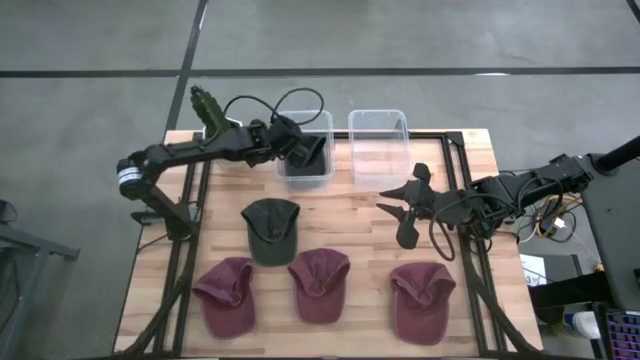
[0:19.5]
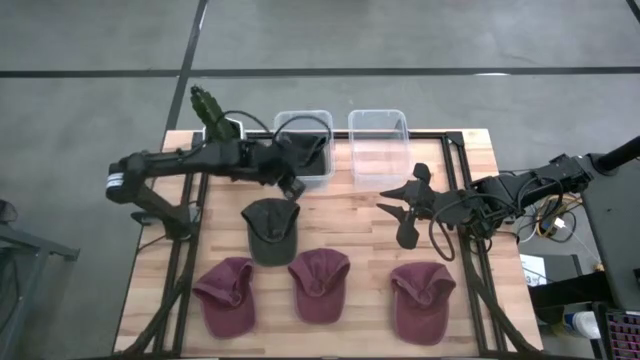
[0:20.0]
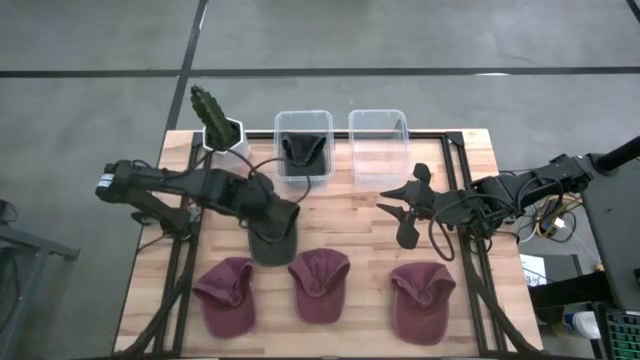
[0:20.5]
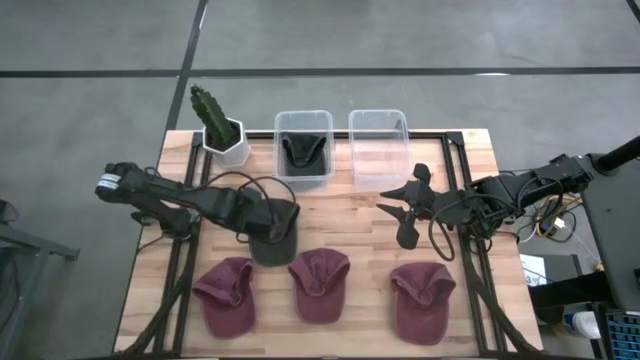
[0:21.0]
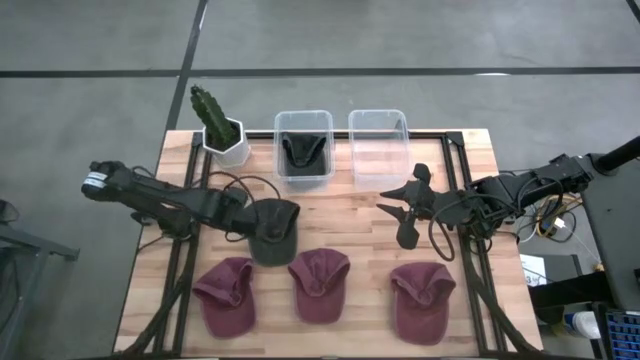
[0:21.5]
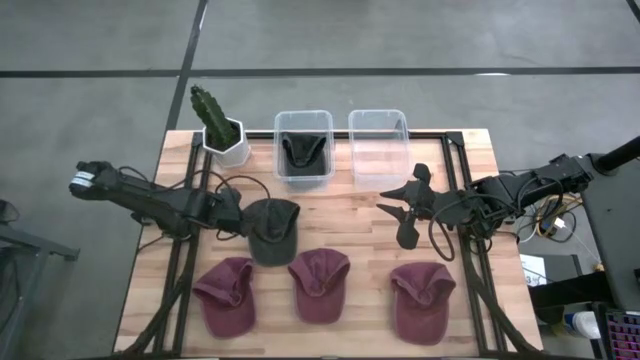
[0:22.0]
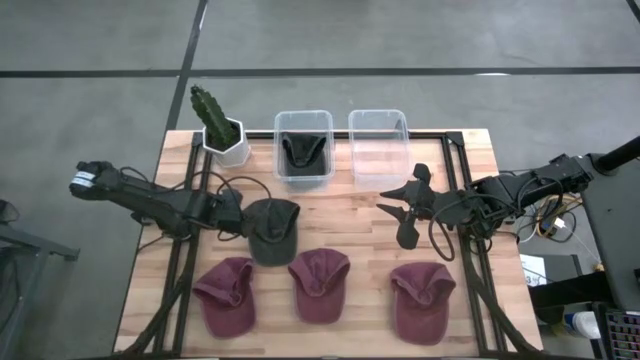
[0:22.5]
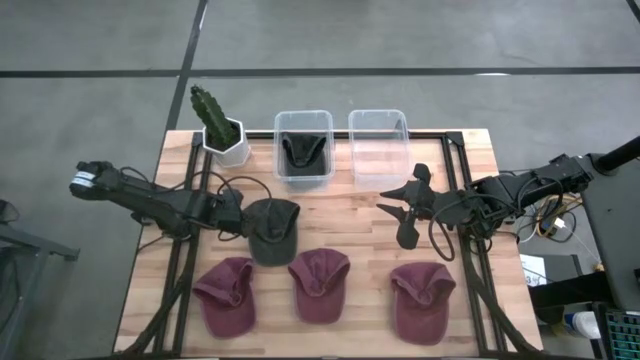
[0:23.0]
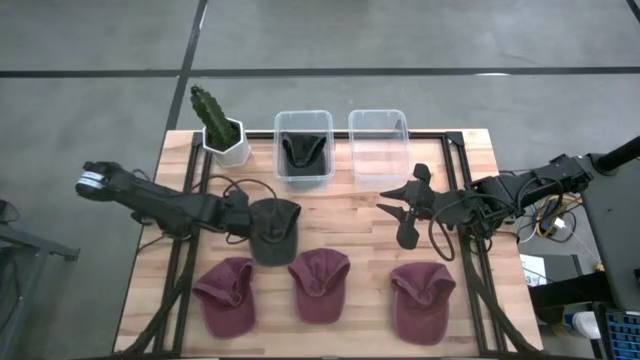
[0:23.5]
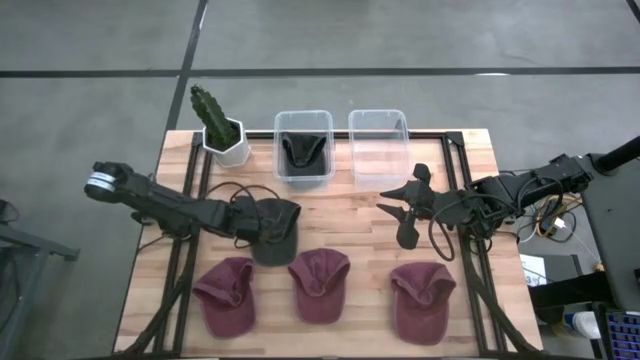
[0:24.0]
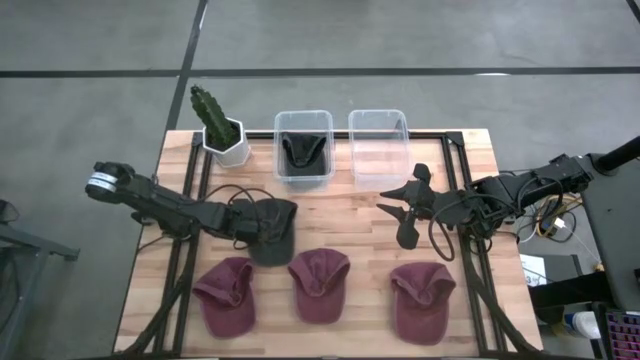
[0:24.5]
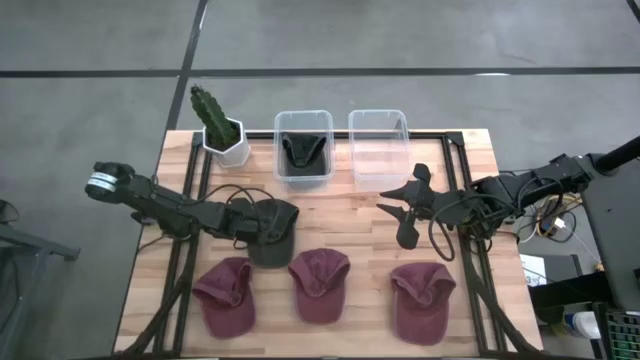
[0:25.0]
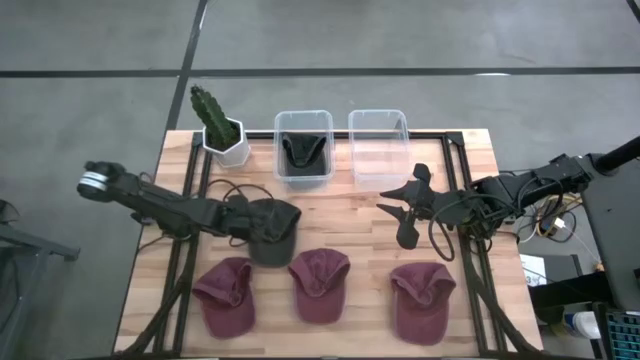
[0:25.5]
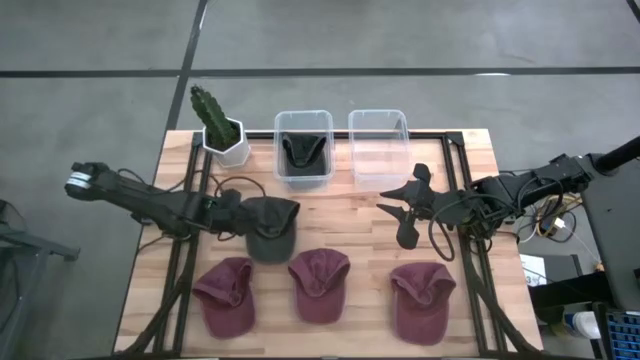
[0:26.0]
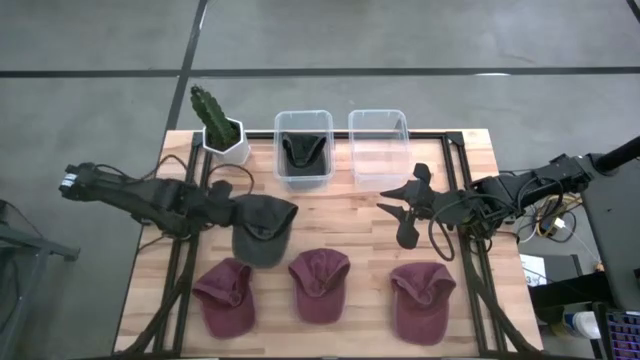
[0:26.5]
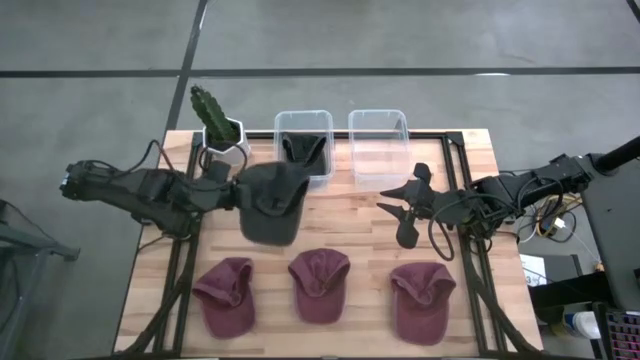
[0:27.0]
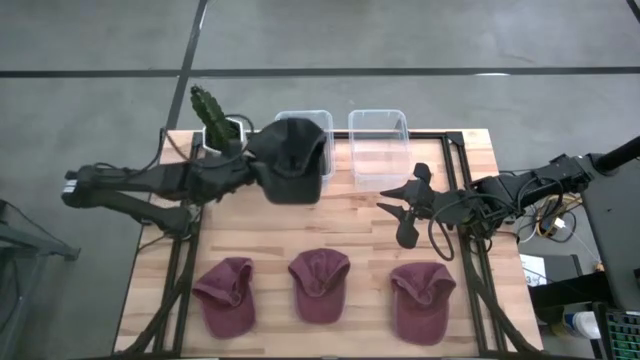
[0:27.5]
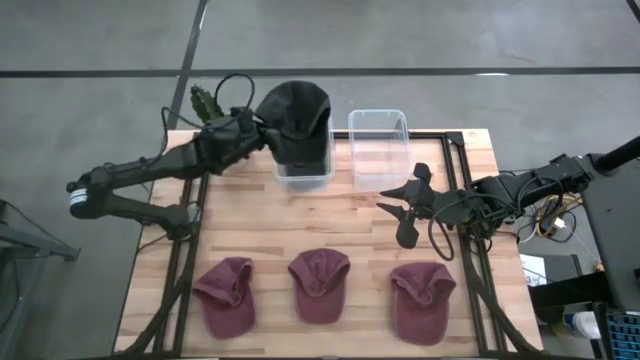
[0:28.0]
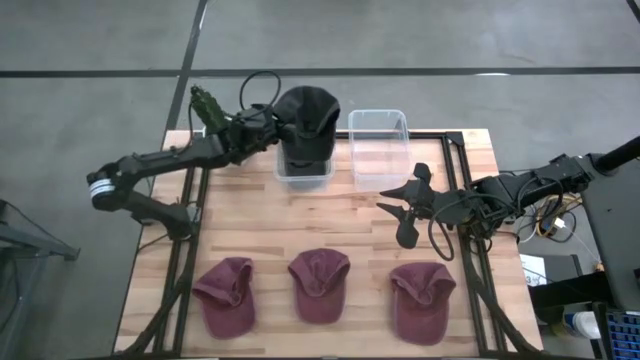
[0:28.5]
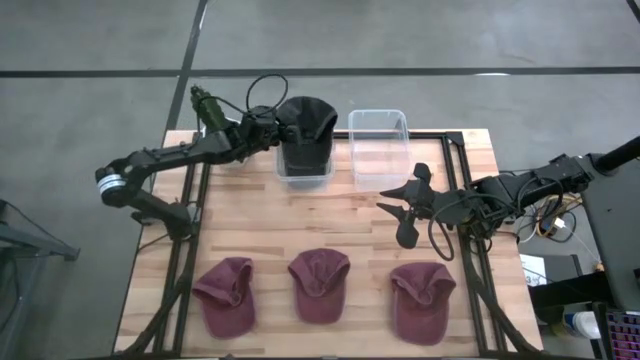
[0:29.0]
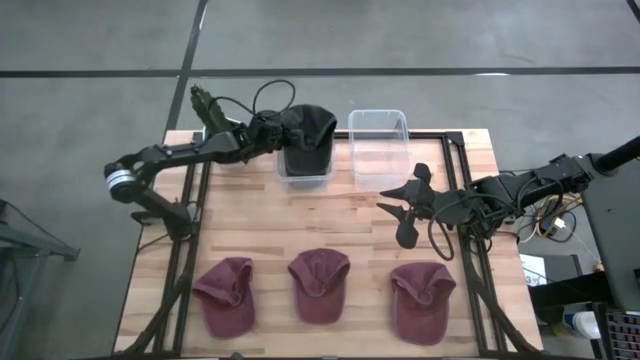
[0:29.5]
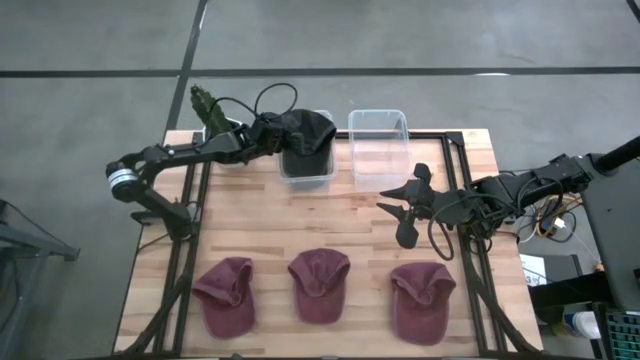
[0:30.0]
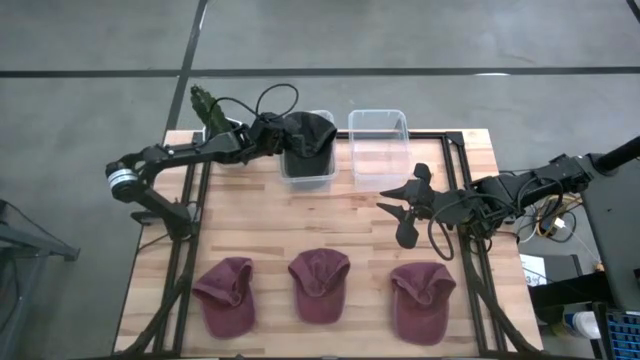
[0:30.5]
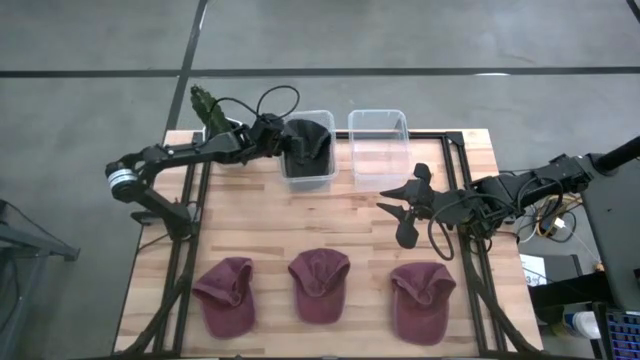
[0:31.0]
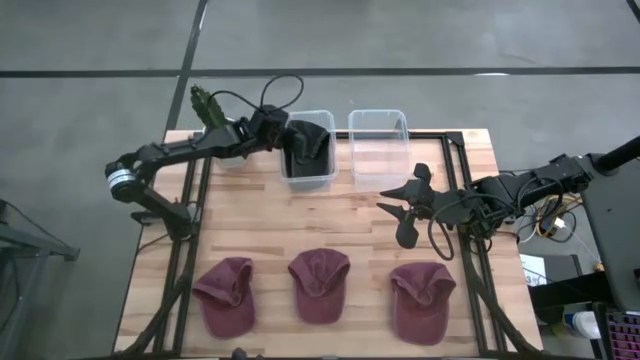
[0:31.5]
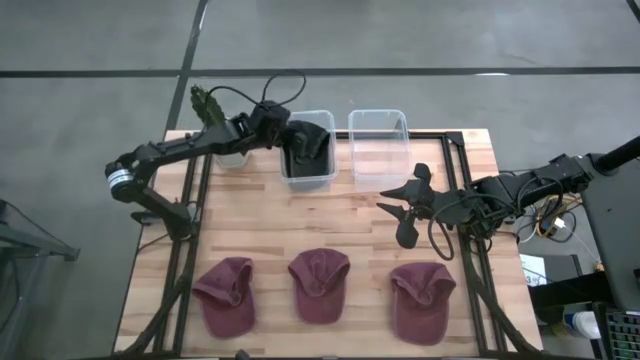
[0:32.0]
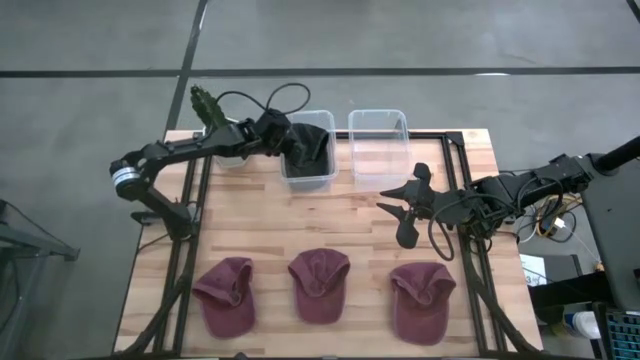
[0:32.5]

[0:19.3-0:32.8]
Task: Pick & Place hat
Put the black cap into the left transparent bin

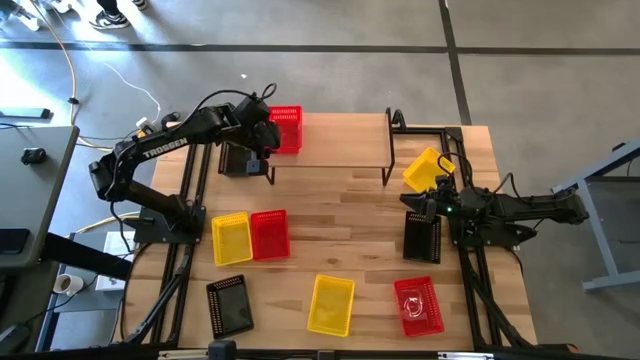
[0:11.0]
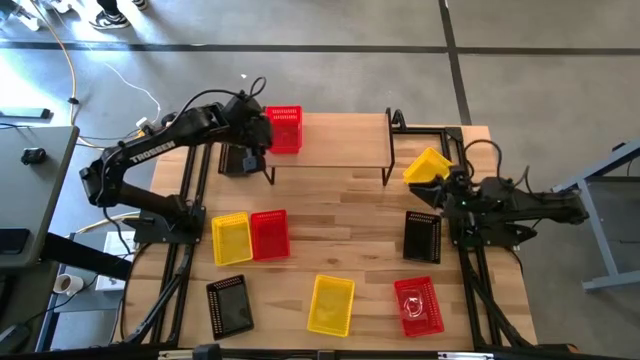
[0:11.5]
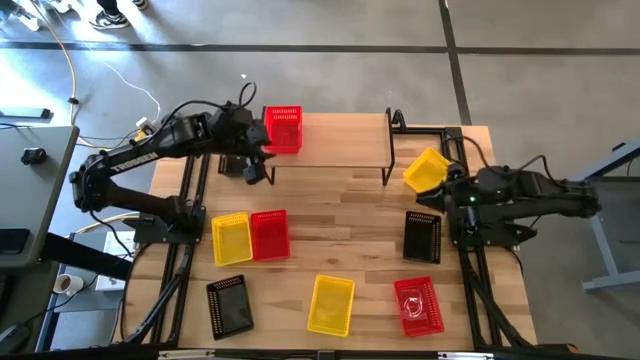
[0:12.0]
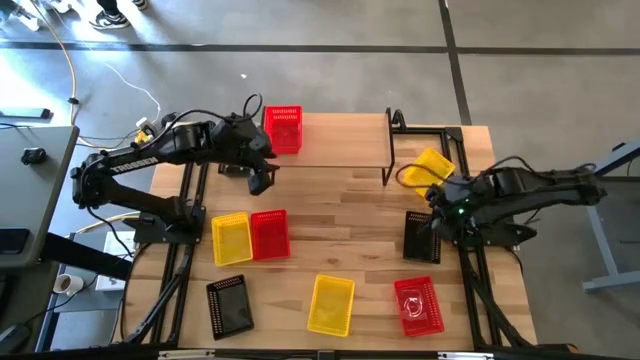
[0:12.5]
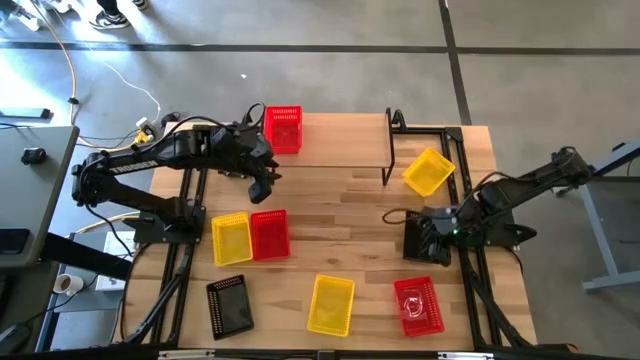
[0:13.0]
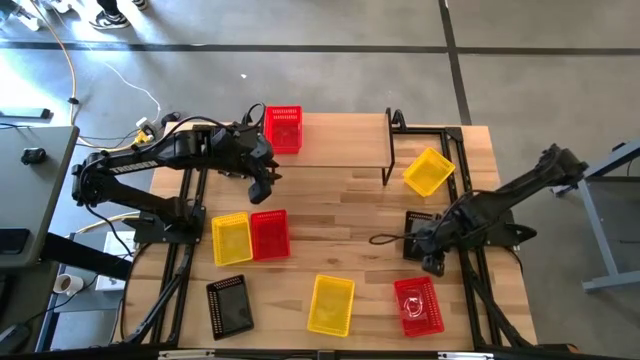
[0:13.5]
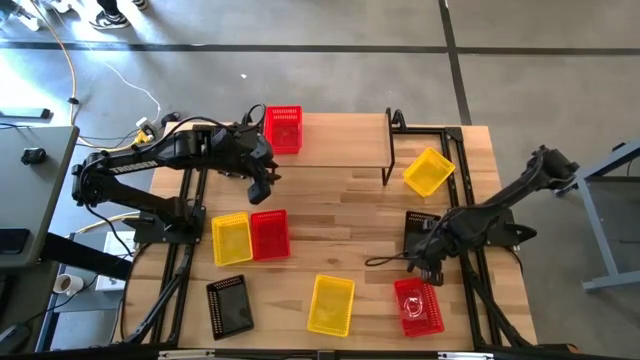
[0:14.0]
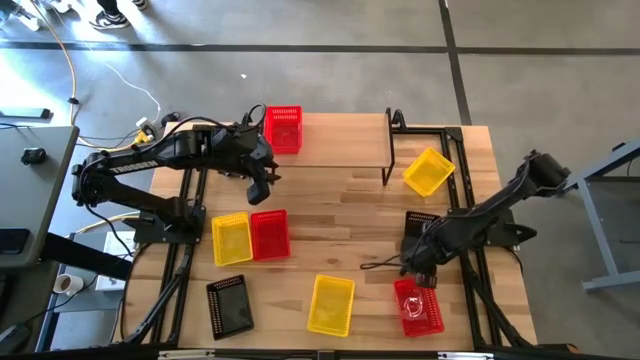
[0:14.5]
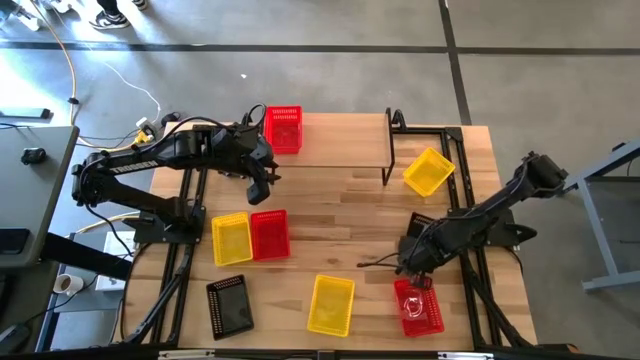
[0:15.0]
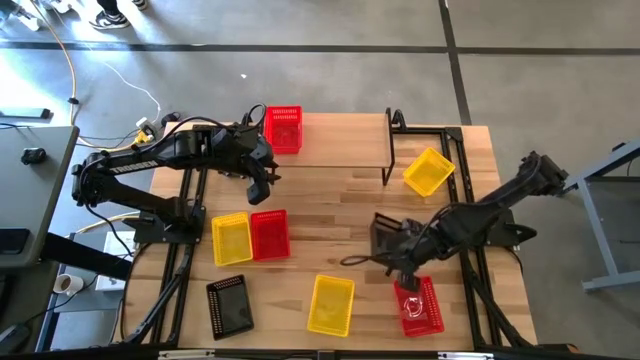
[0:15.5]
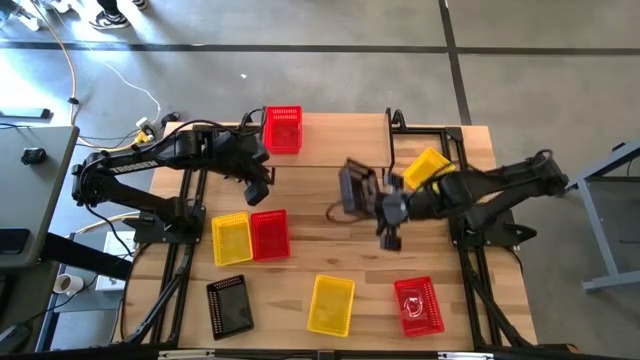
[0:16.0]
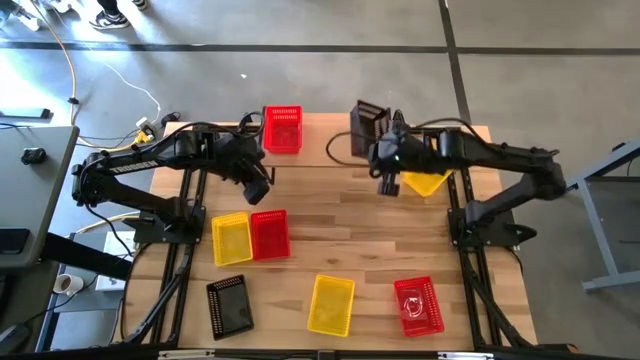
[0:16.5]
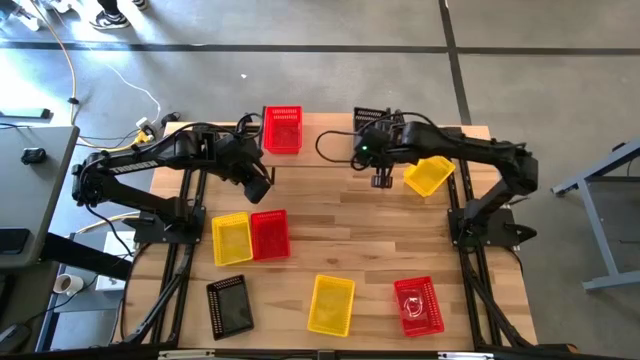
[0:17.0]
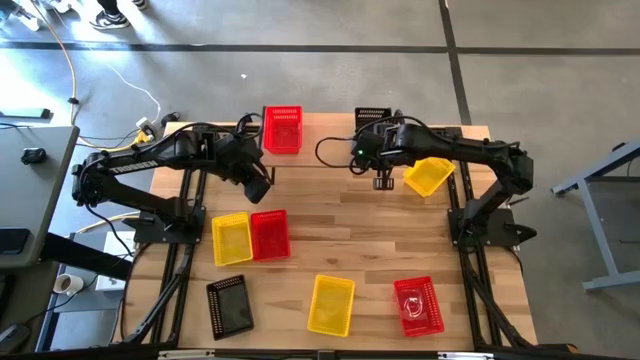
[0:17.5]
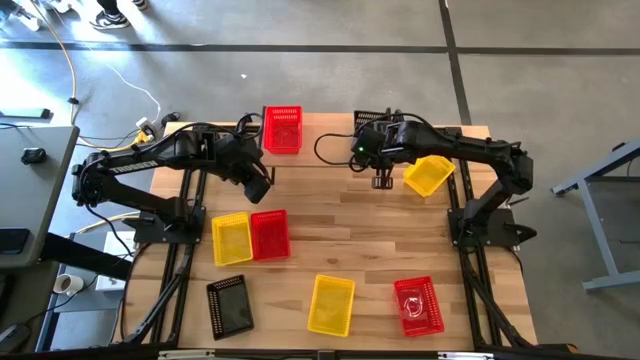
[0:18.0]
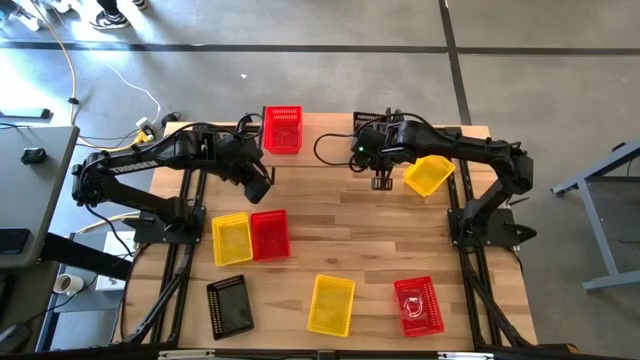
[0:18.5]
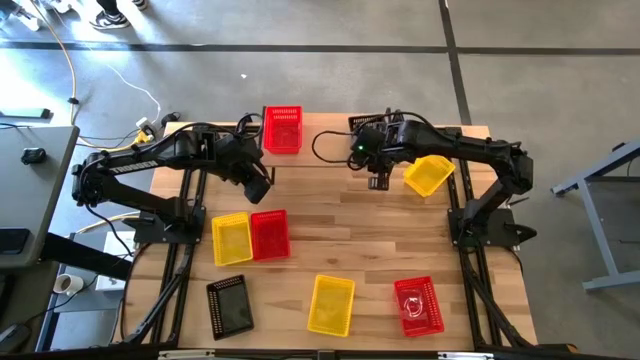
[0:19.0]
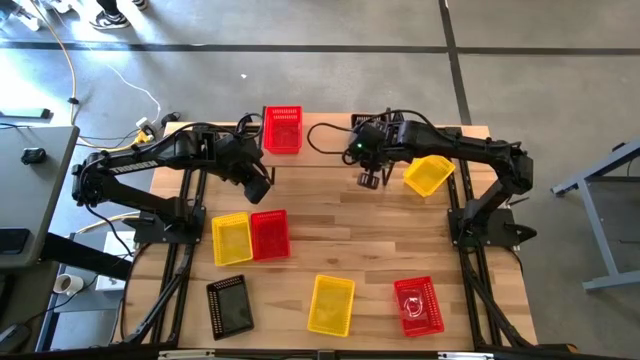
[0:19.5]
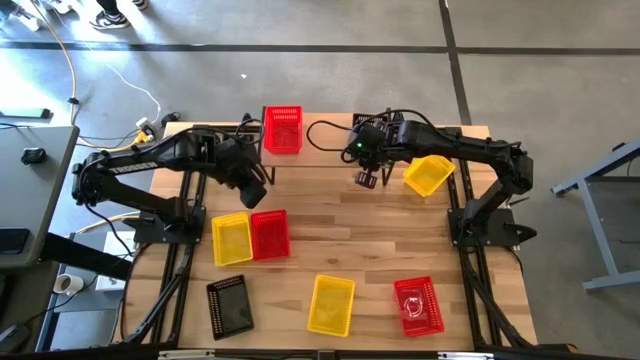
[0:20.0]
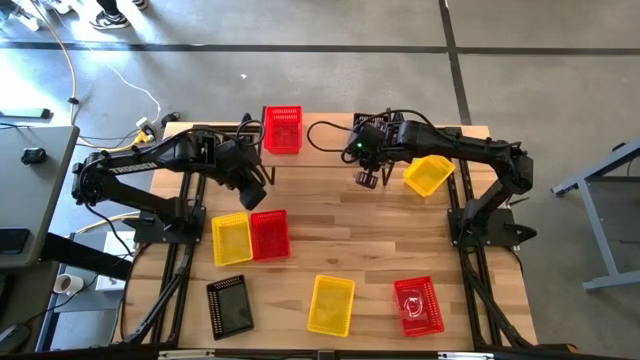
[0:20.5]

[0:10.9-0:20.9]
Task: Stack baskets on shelf by color
Put the middle right black bin on the shelf
